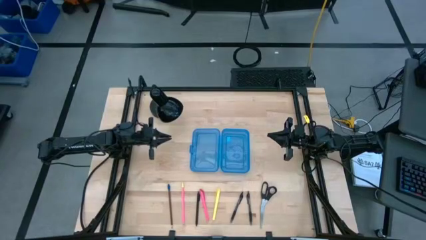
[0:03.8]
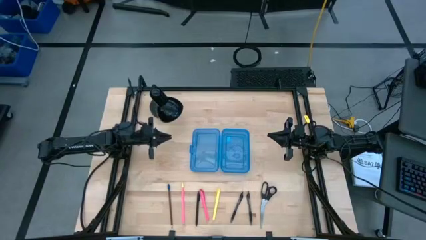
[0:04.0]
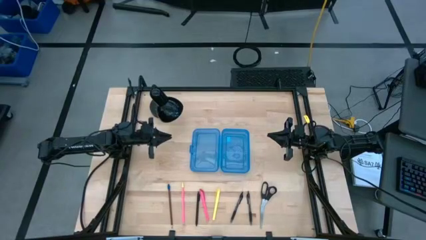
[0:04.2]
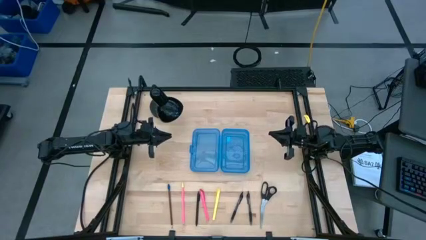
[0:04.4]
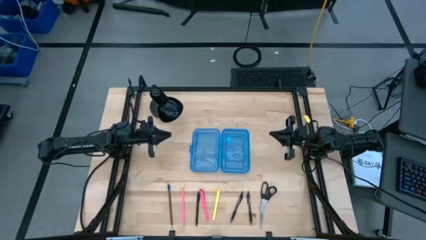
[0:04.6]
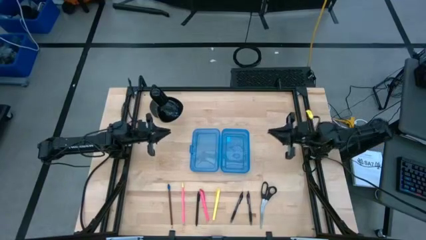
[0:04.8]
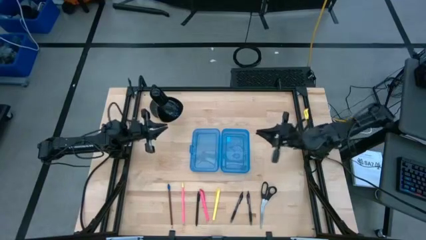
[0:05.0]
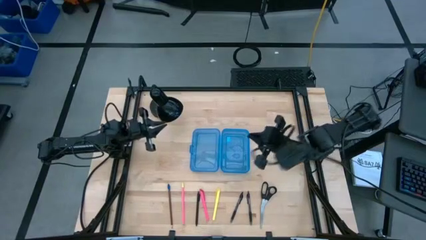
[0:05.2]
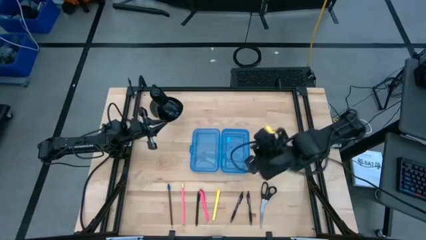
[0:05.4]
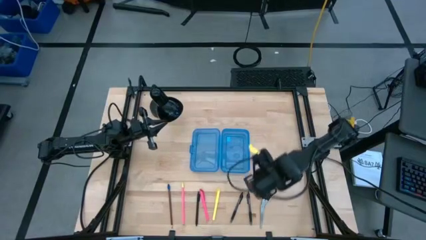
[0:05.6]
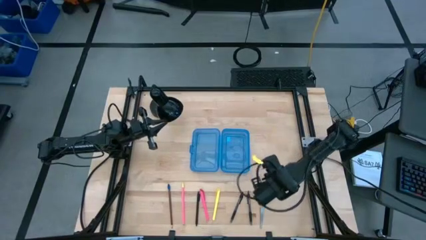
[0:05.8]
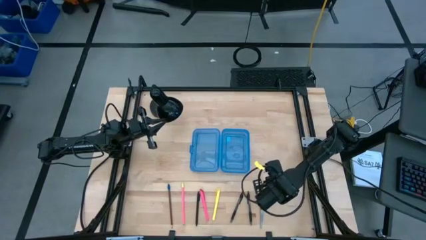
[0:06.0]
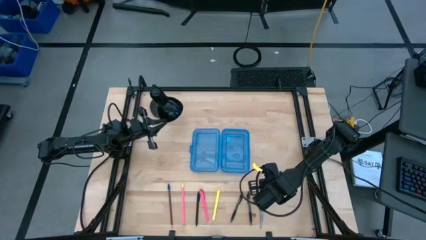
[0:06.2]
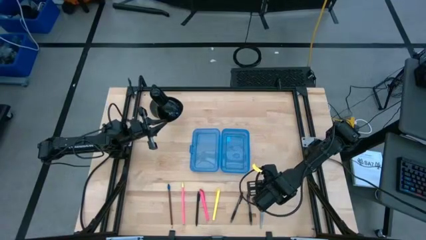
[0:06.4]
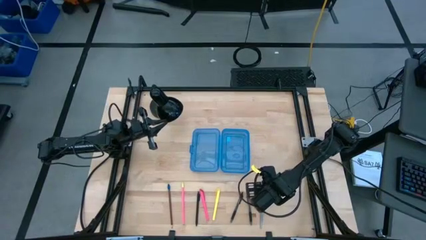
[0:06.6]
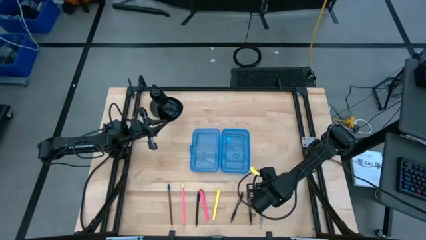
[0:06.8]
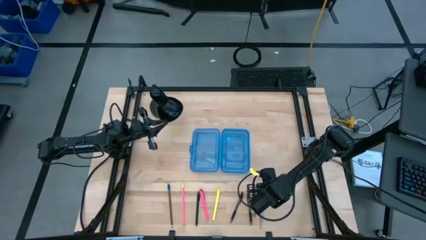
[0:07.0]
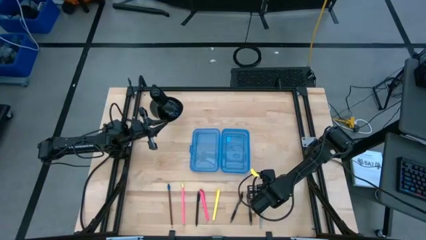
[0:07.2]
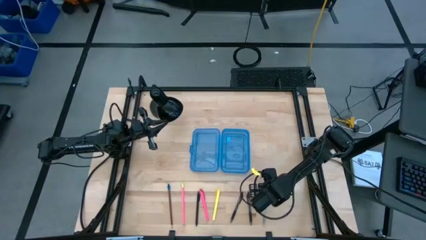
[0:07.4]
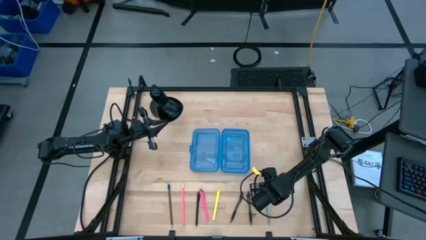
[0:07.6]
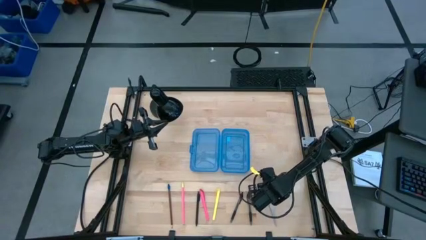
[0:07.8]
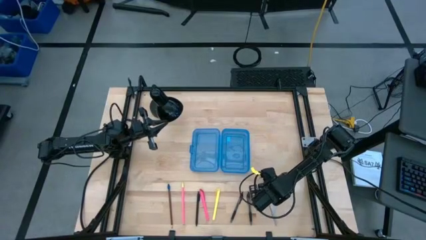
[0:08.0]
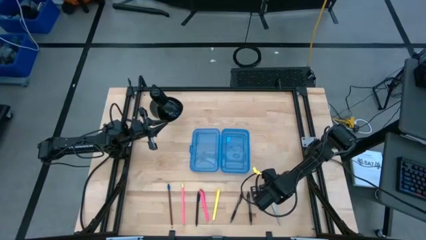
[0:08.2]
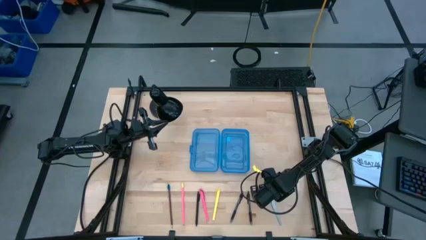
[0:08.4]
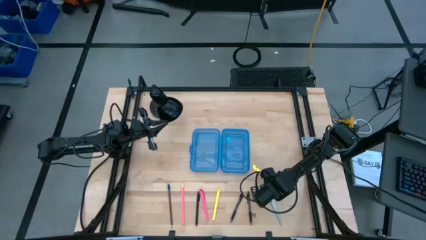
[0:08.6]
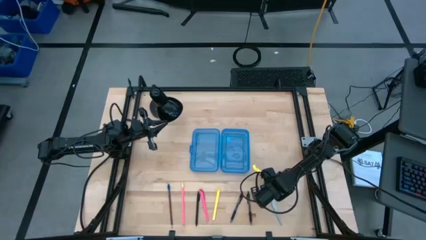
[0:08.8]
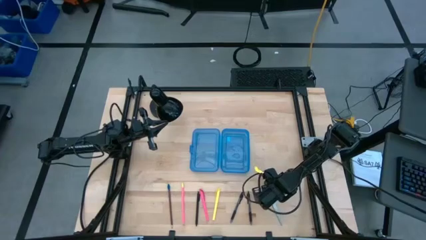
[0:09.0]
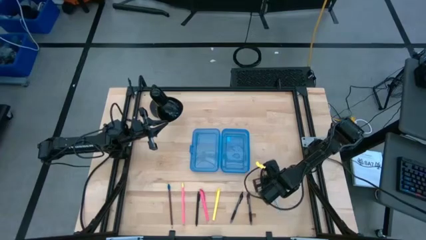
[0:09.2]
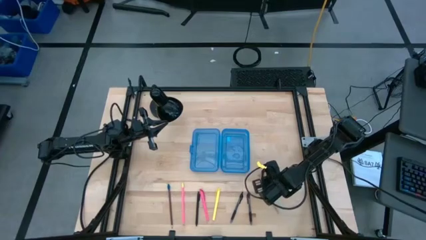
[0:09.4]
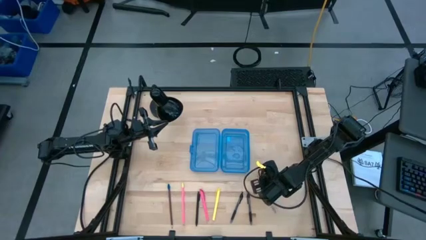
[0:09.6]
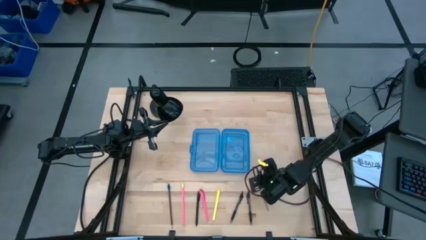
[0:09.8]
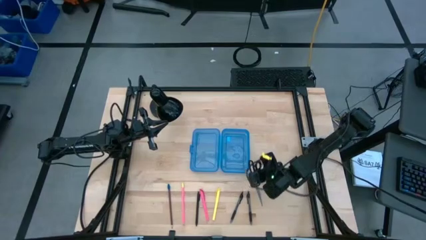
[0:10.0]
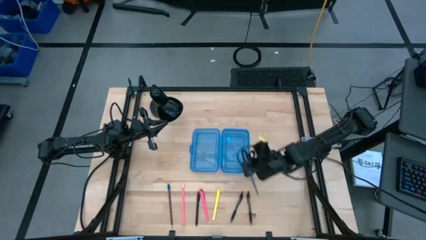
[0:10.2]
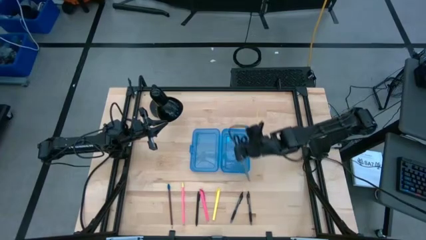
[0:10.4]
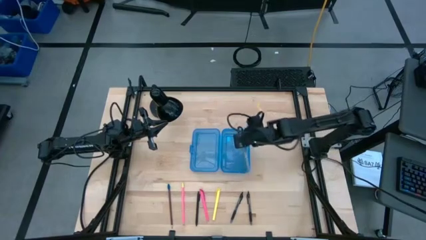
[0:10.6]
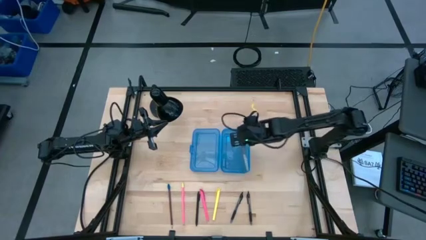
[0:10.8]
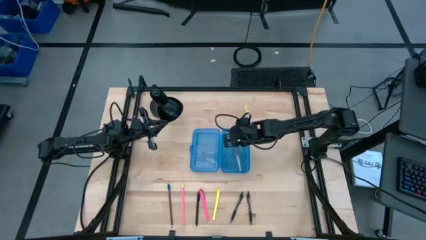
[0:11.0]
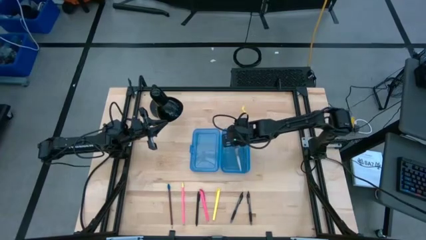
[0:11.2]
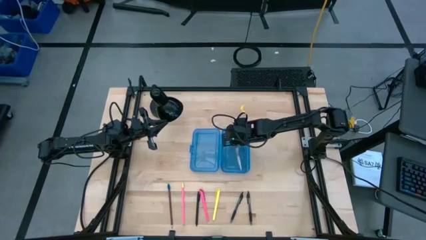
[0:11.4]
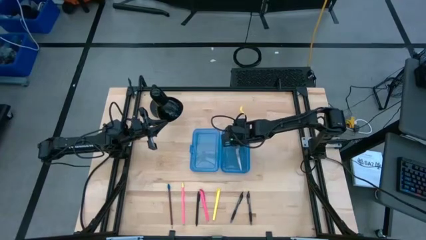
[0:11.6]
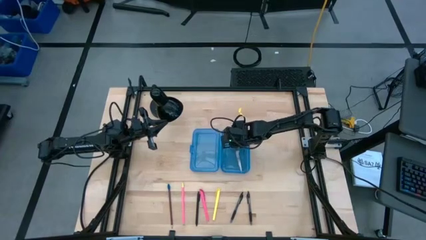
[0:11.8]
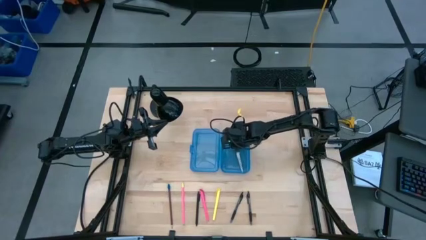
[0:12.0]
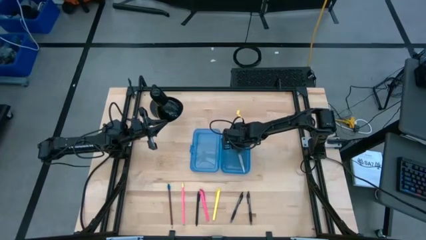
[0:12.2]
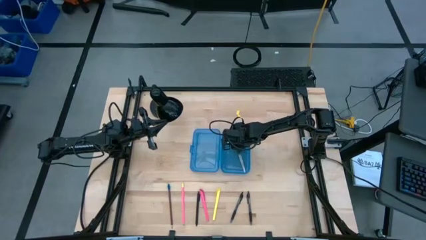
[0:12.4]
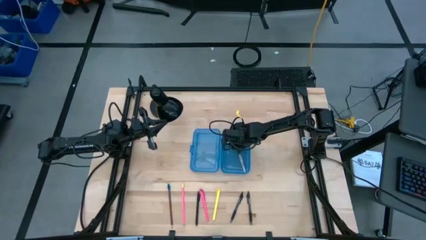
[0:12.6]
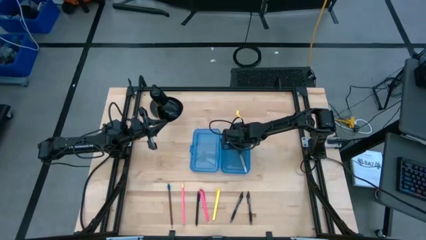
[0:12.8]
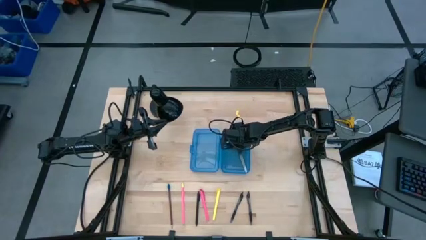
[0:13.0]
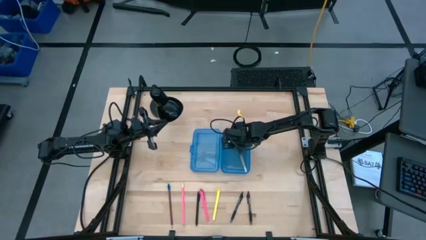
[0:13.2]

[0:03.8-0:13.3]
Task: Pick & place school supplies into a supply box
Put the scissors into the supply box

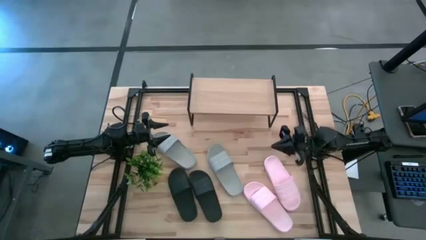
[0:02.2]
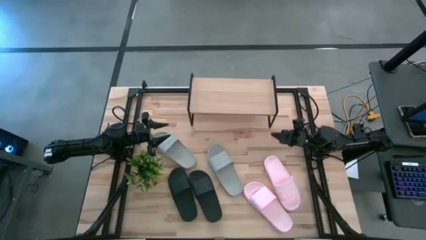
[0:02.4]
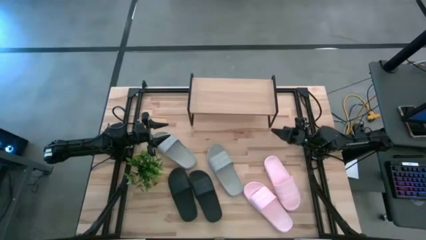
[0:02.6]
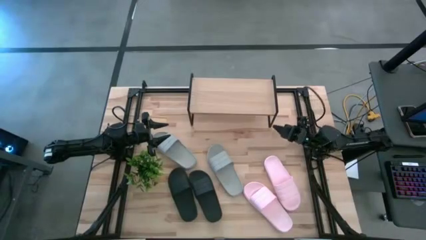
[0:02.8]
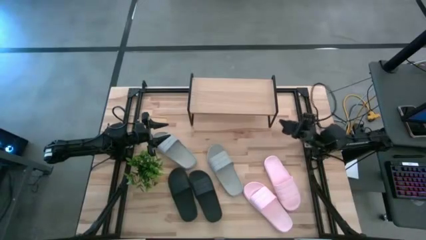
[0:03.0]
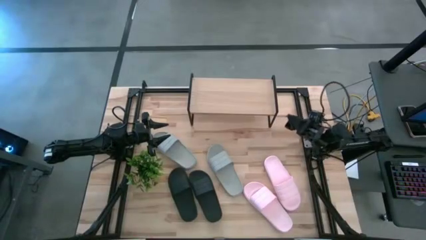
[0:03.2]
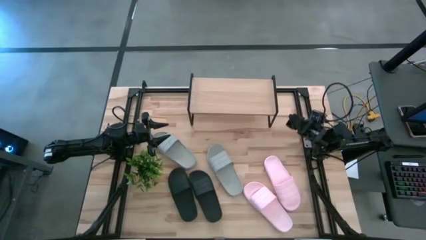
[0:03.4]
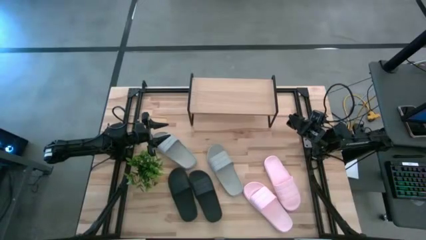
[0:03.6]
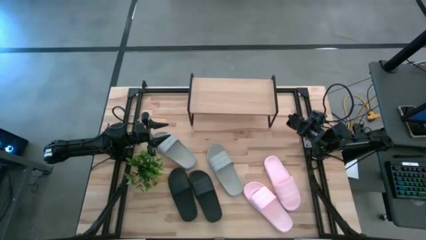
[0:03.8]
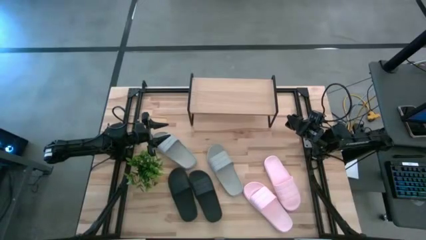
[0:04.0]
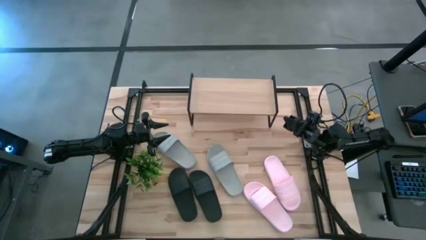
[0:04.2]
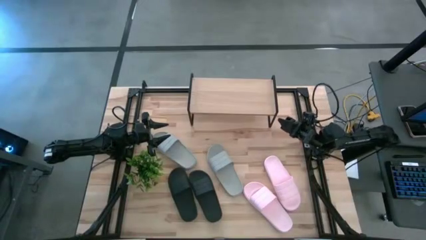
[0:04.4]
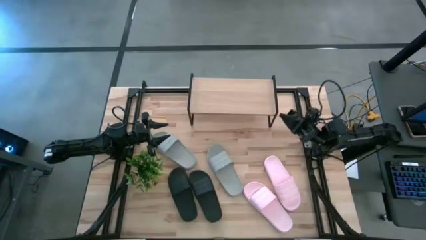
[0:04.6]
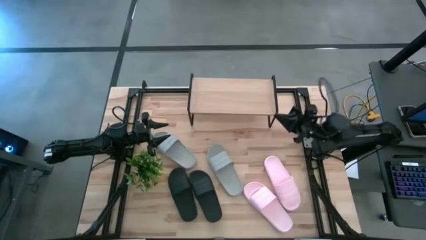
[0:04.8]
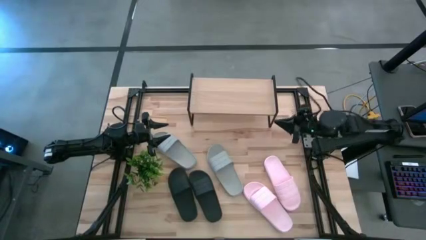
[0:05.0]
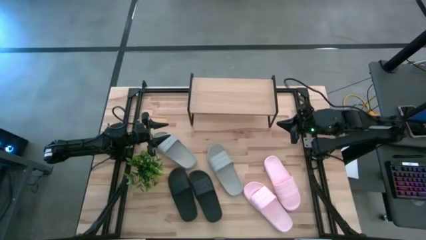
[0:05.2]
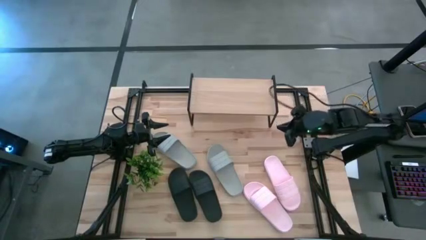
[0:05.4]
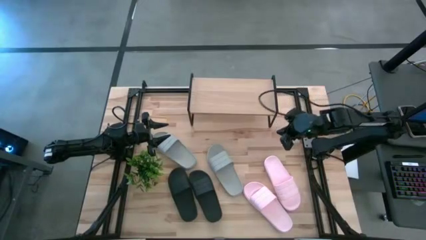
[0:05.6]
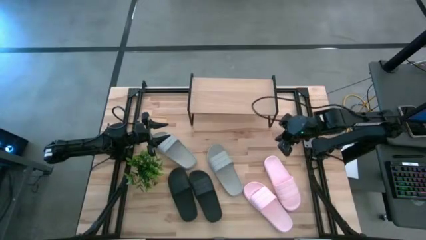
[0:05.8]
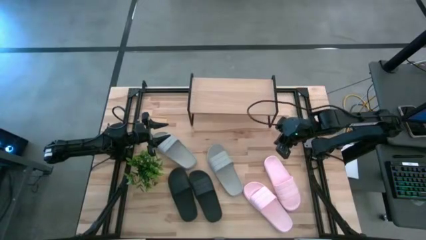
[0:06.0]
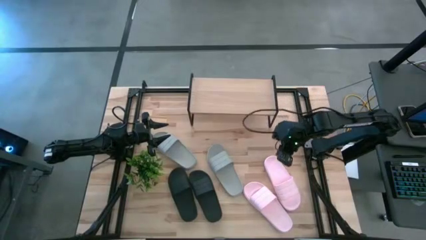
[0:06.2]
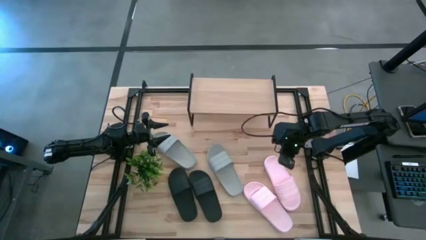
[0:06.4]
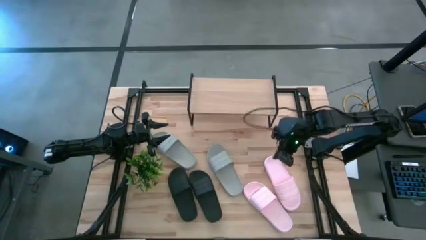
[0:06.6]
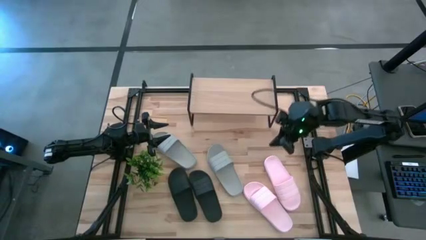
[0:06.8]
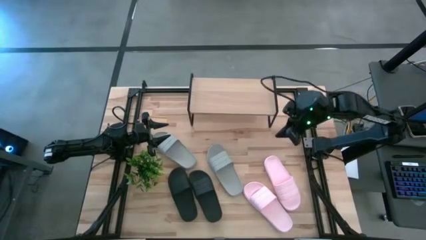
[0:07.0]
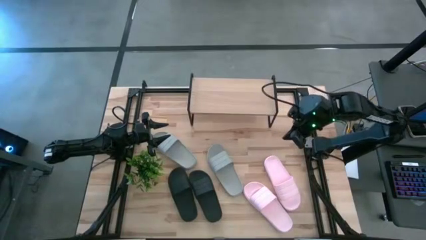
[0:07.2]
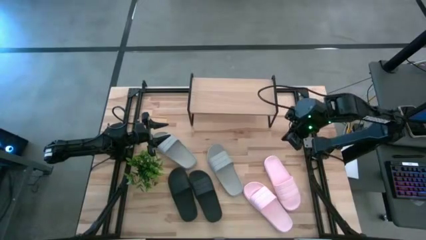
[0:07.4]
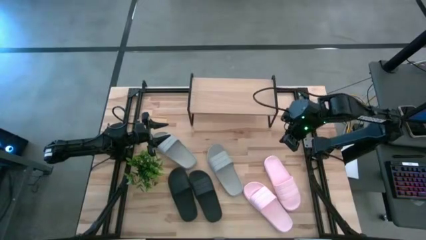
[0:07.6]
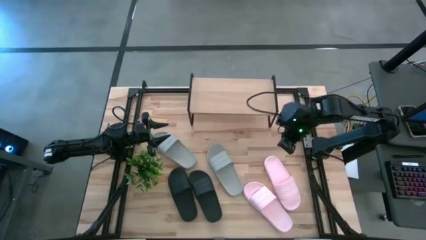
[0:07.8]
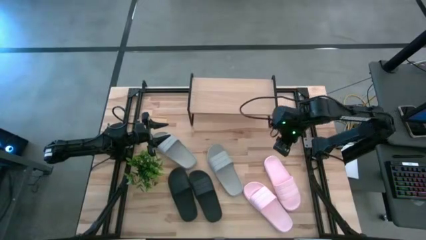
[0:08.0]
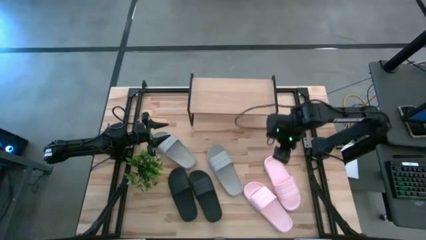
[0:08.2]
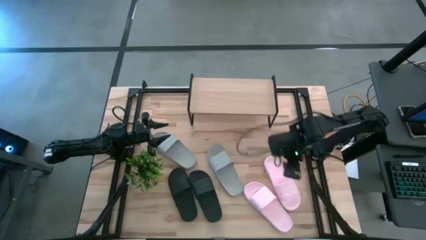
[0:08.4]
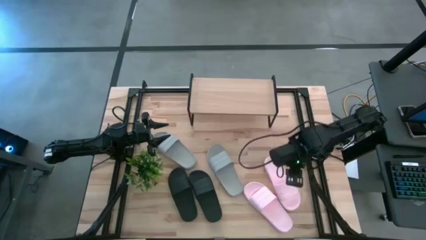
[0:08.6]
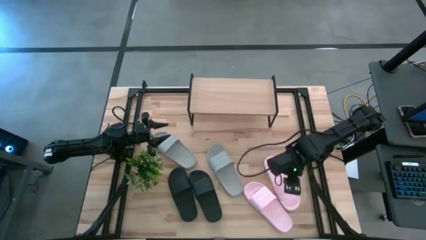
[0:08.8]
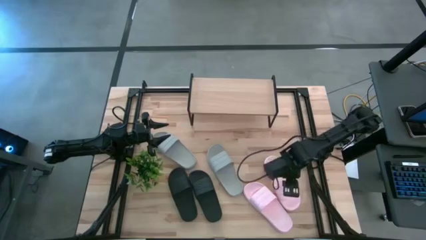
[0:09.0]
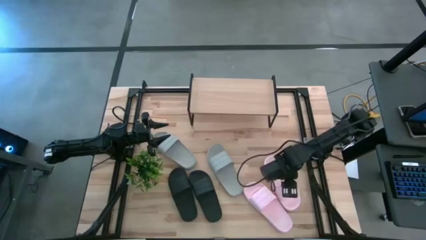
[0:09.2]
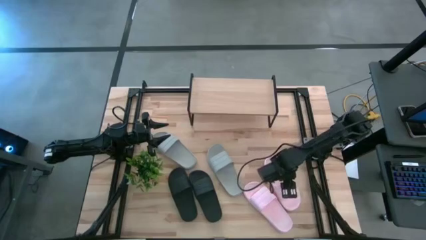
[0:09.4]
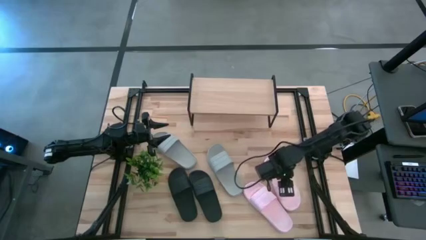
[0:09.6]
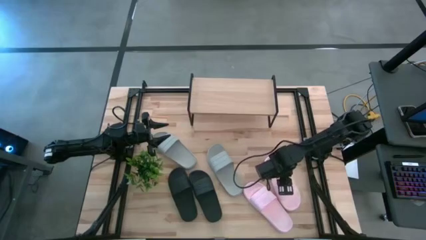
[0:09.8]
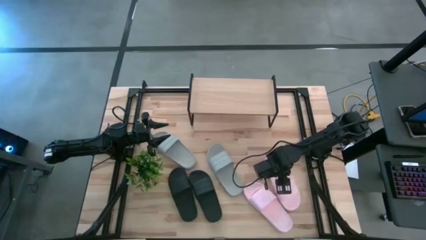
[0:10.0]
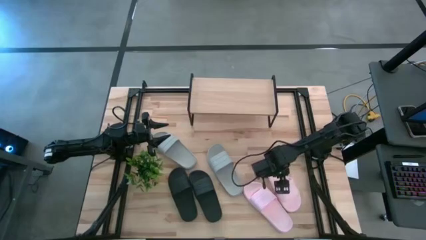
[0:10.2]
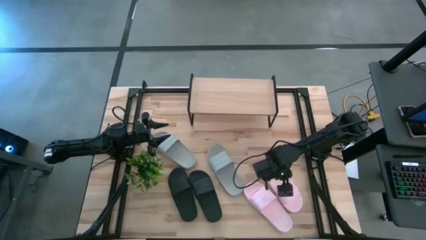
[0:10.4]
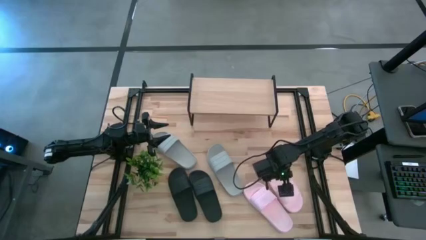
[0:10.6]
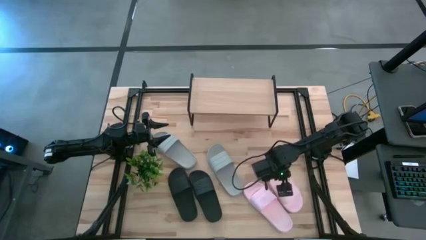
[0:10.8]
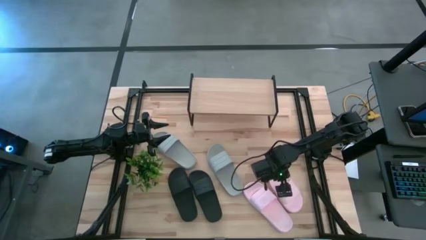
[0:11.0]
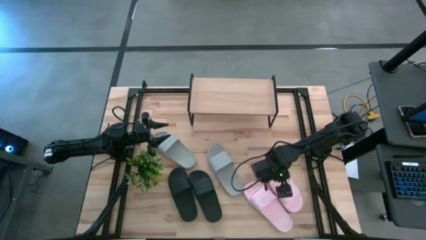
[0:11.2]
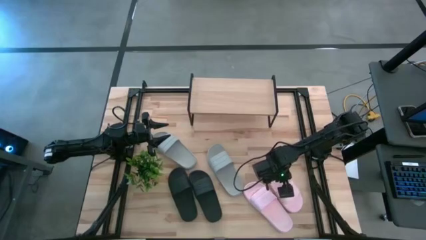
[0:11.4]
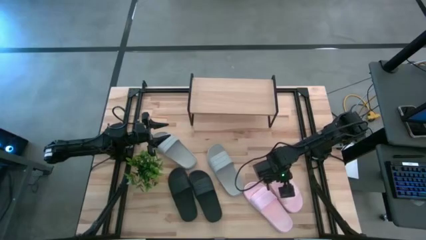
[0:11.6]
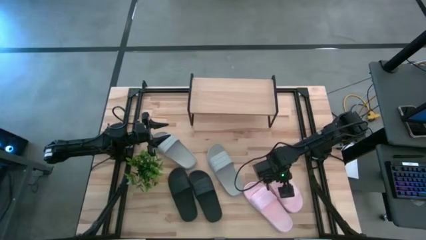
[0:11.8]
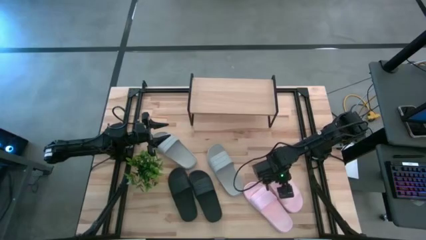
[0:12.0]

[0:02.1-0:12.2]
Task: Pick and place slides into the shelf
Put the right pink slide on the shelf
